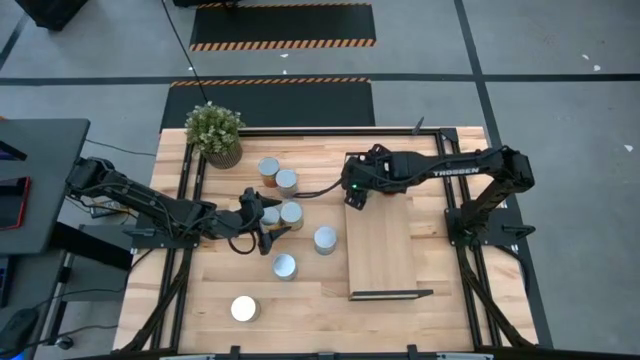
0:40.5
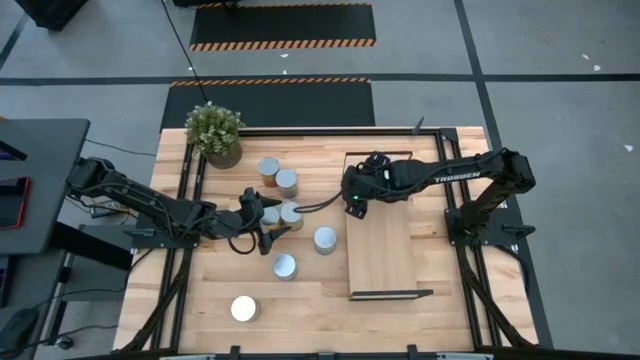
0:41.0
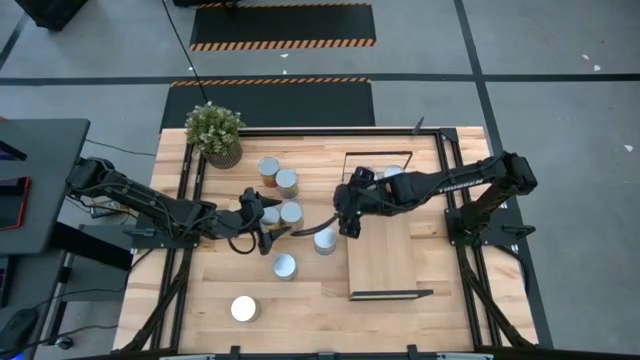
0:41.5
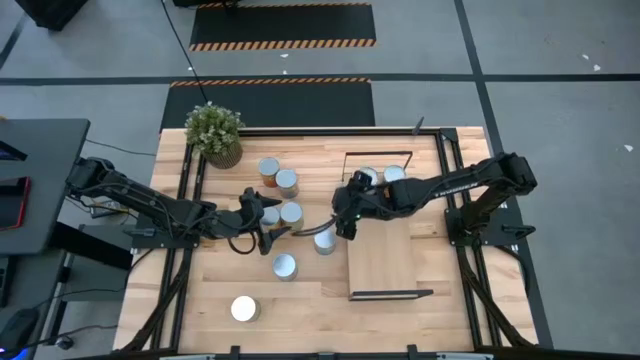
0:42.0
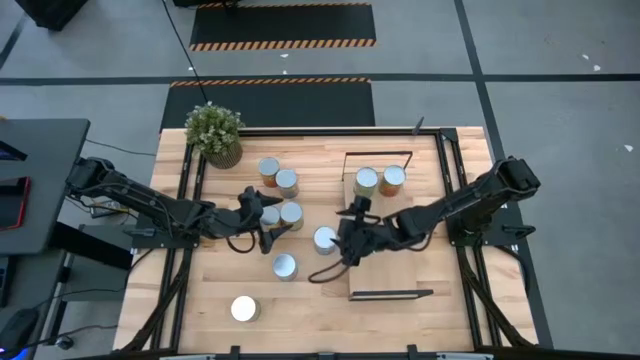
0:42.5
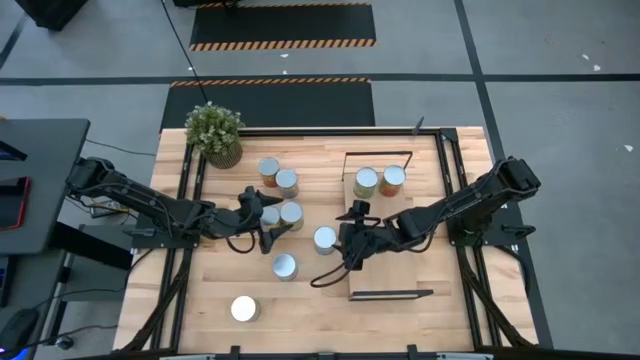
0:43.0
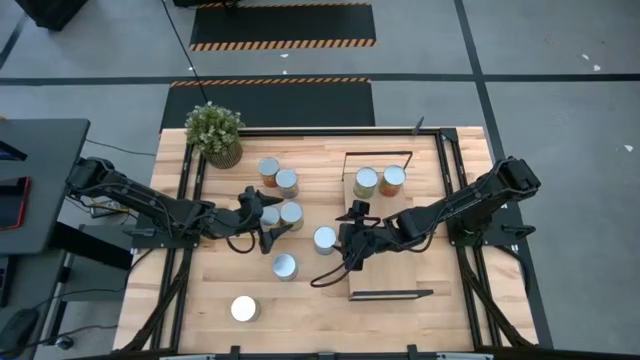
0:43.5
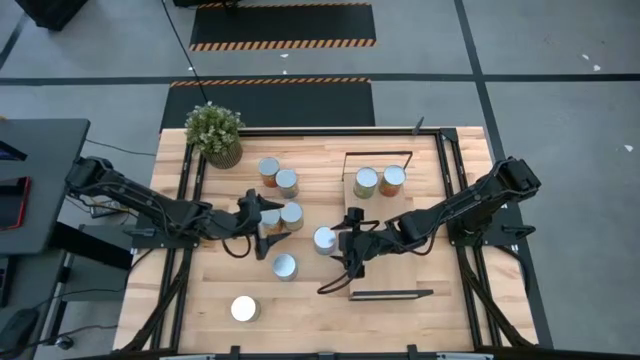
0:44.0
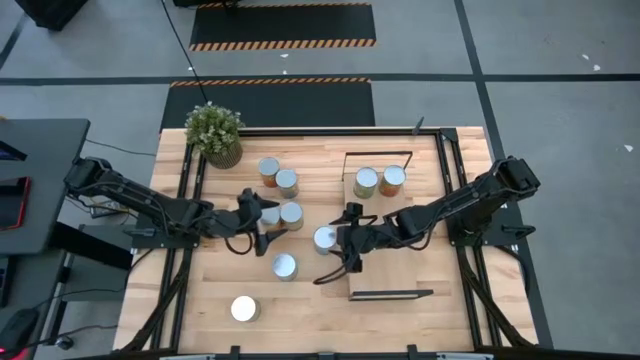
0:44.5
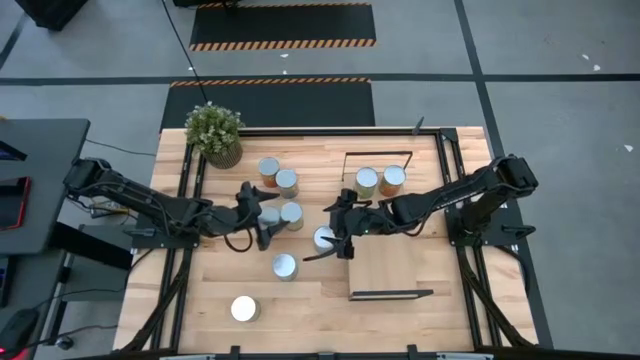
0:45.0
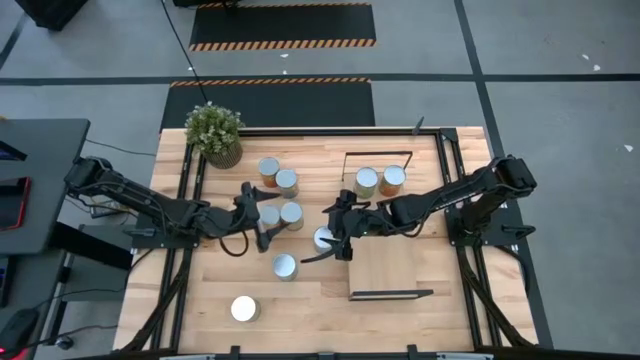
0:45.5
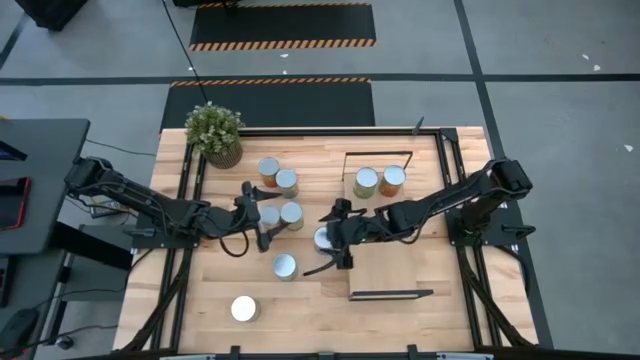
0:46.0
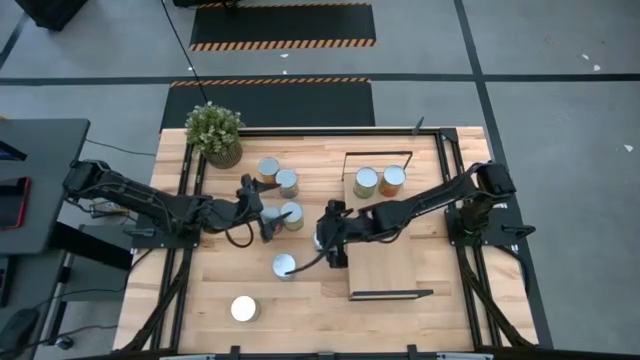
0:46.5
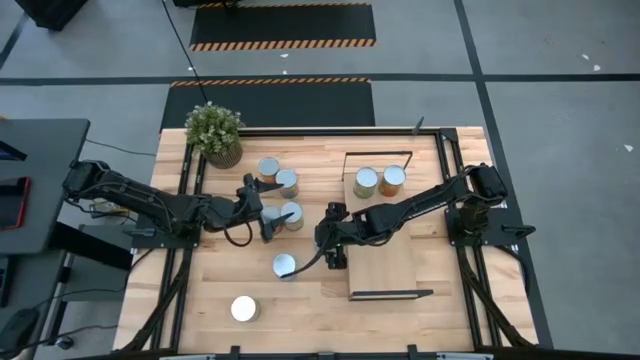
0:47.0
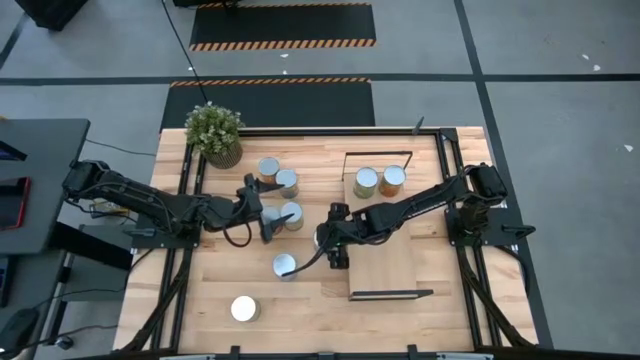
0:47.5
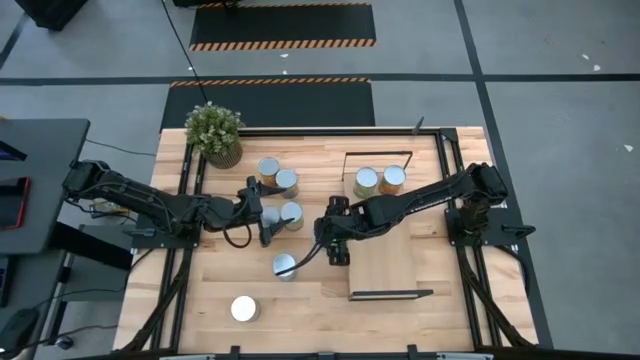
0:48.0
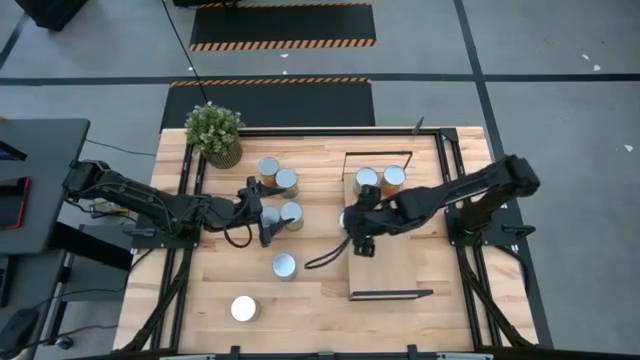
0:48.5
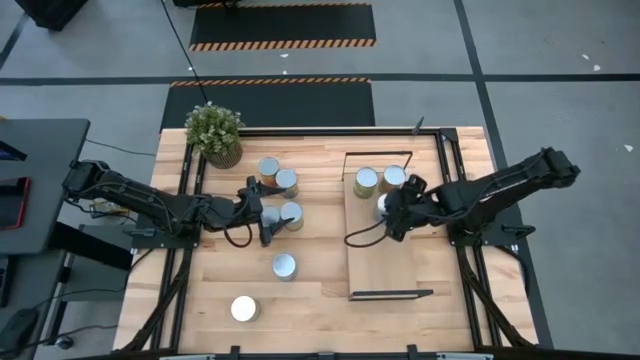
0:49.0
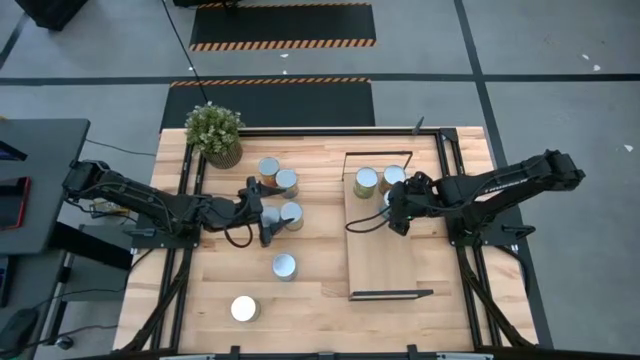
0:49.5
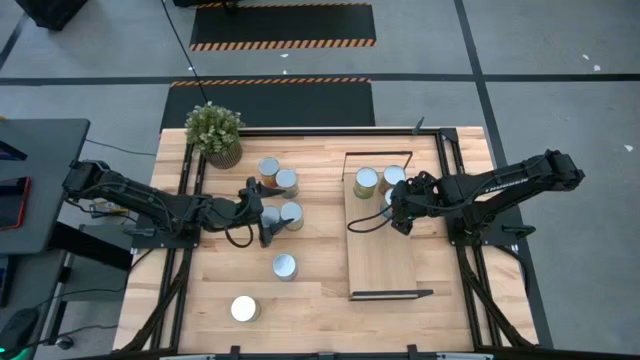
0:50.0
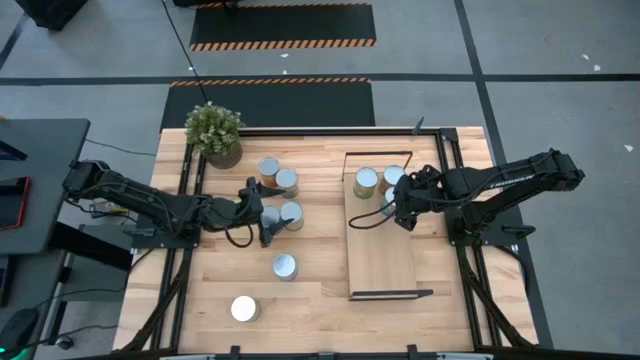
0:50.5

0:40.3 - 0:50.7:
Task: Pick and place cans onto a shelf
Put the canned tomatoes on the shelf

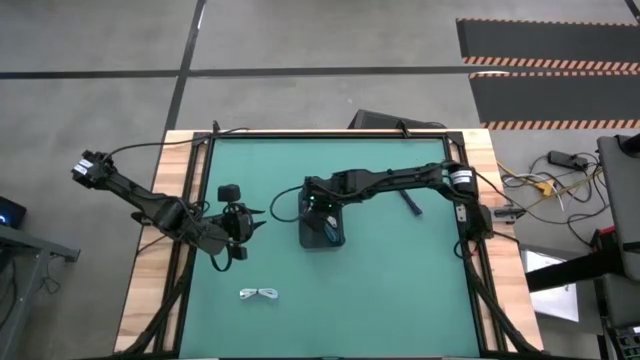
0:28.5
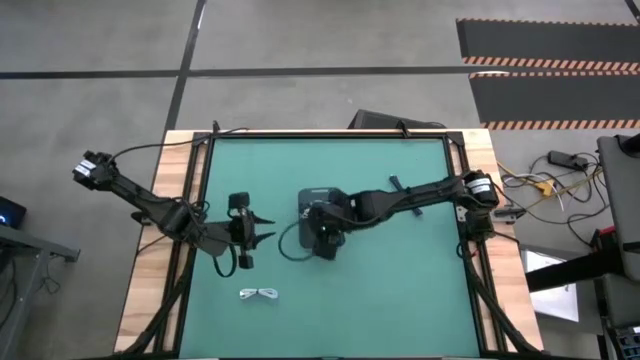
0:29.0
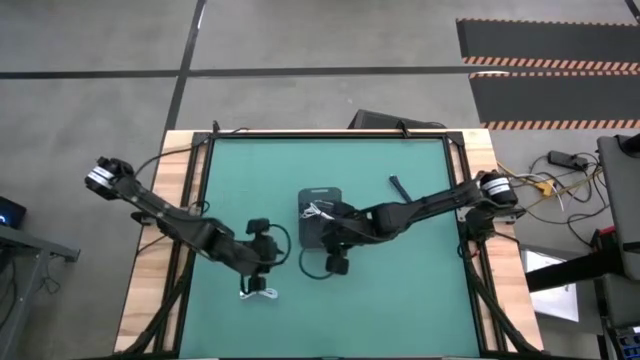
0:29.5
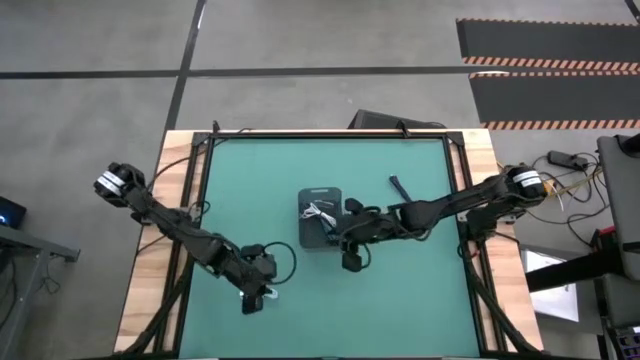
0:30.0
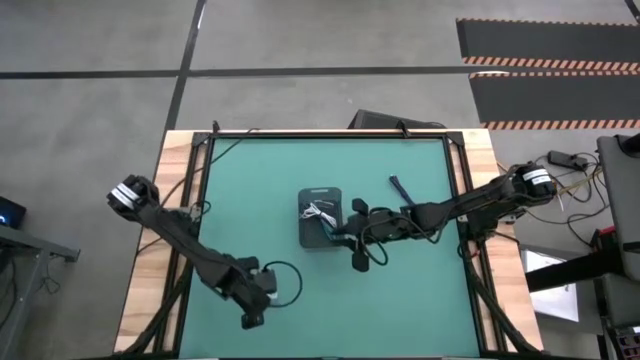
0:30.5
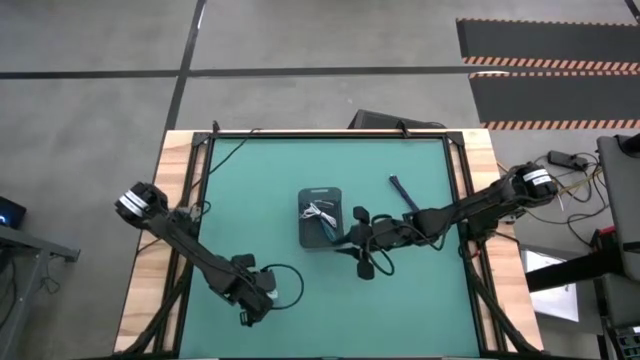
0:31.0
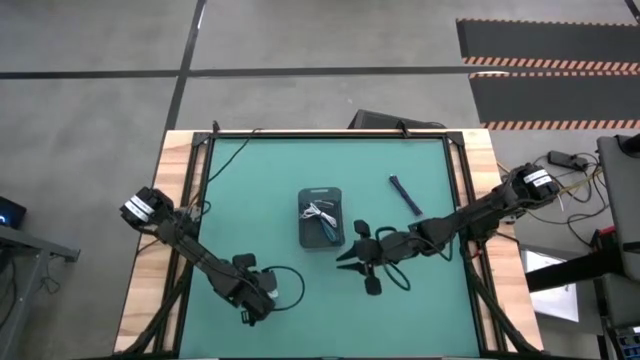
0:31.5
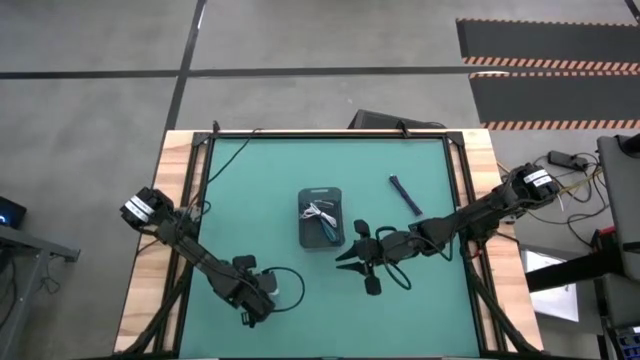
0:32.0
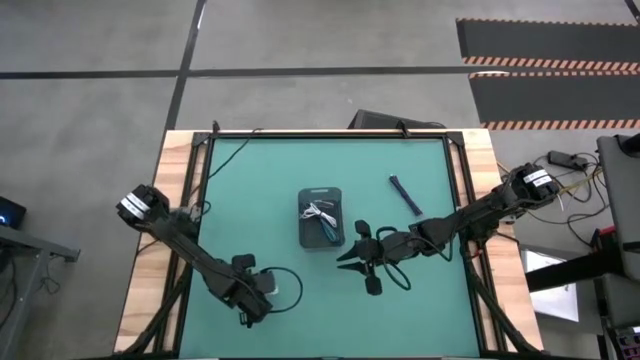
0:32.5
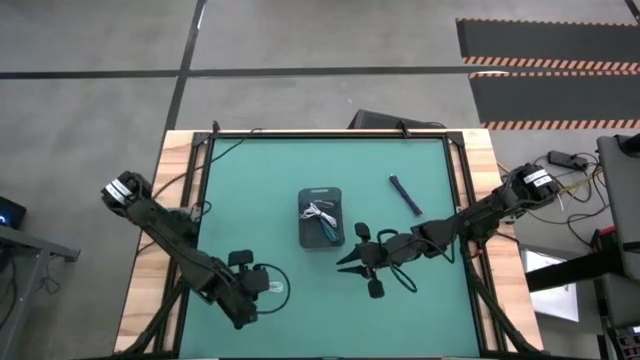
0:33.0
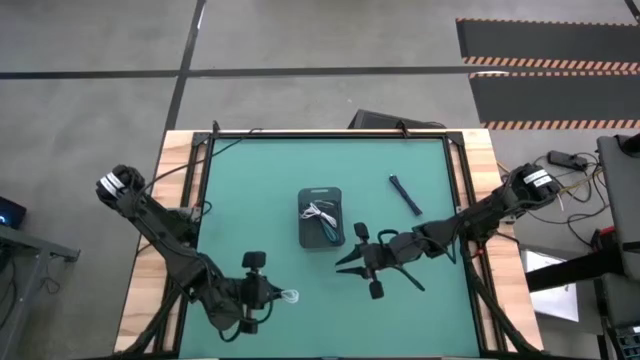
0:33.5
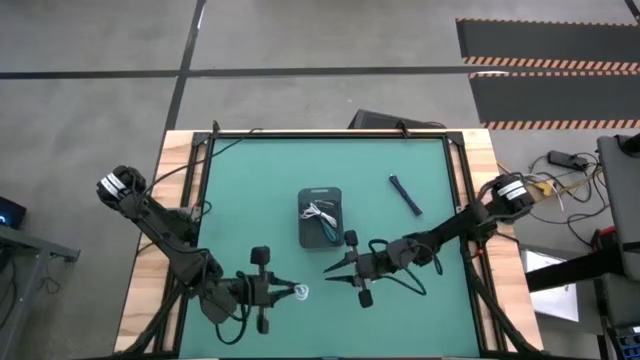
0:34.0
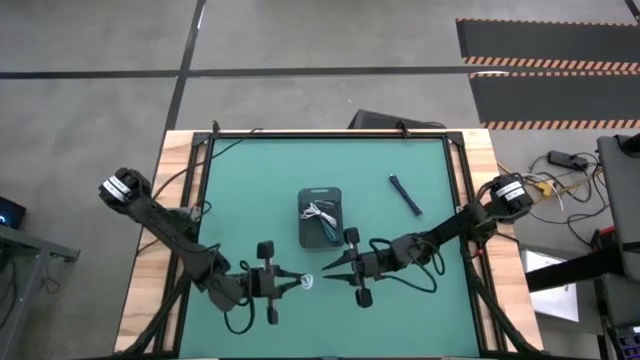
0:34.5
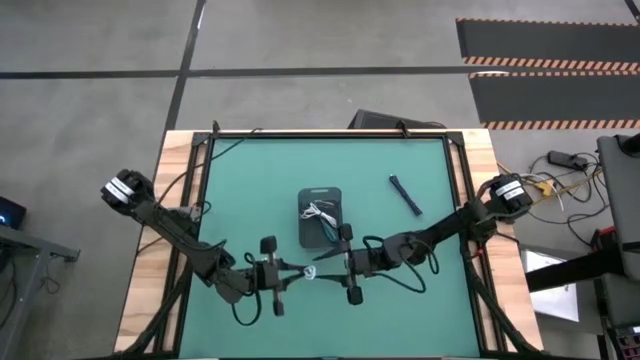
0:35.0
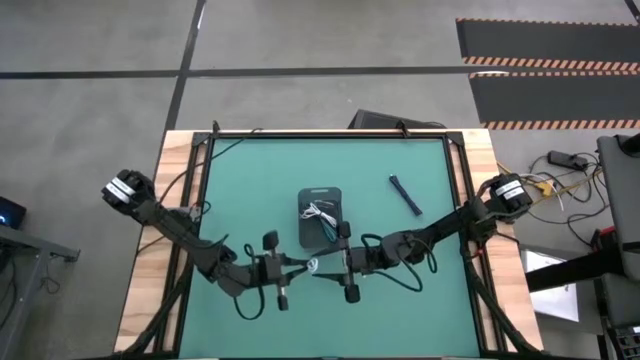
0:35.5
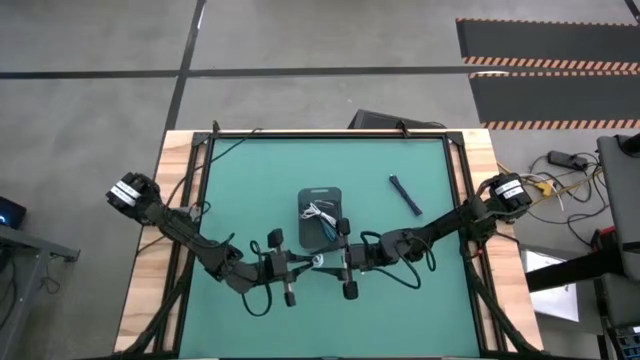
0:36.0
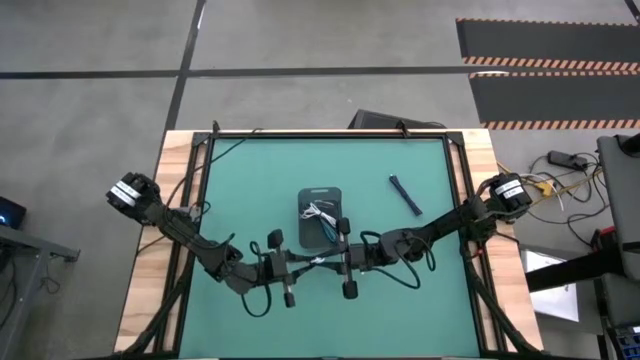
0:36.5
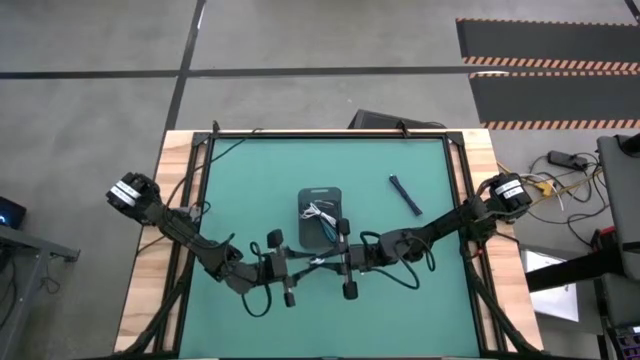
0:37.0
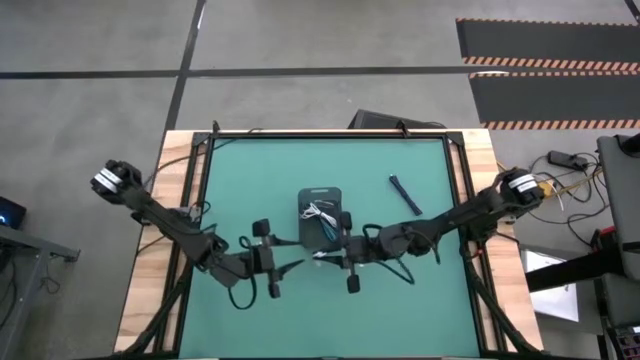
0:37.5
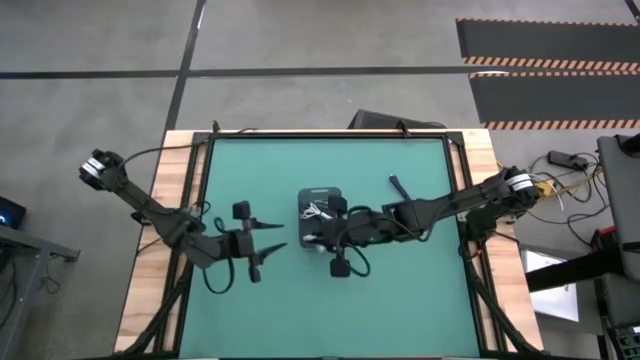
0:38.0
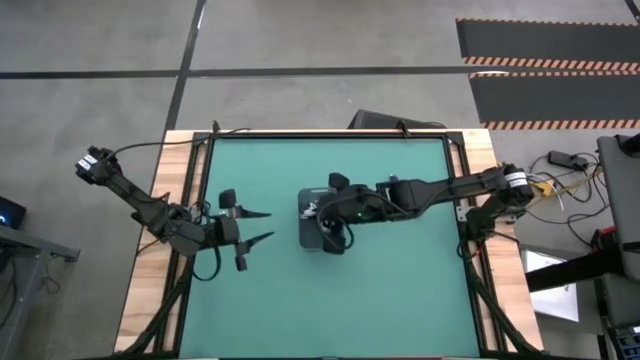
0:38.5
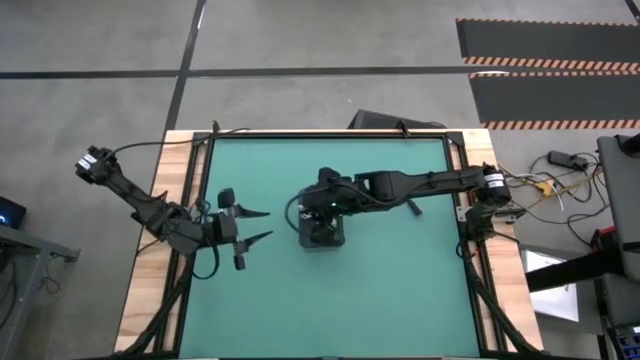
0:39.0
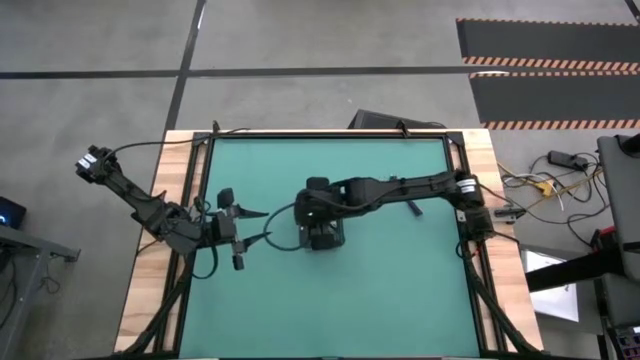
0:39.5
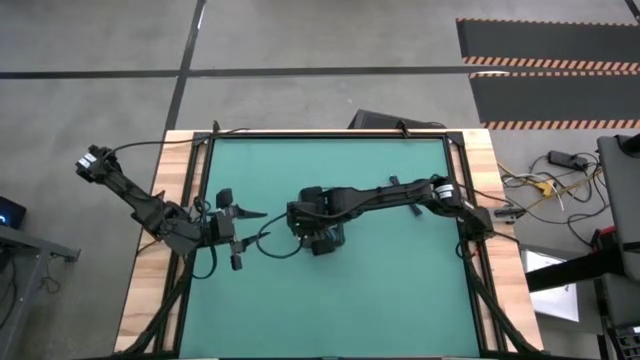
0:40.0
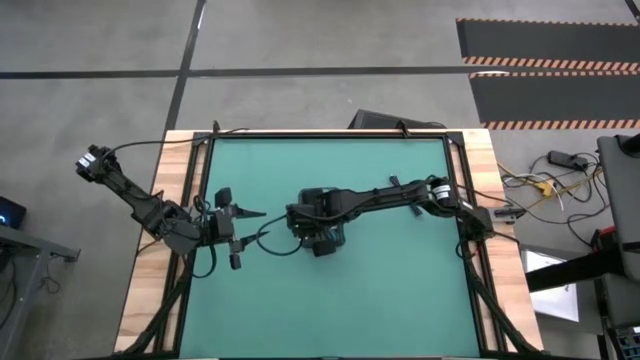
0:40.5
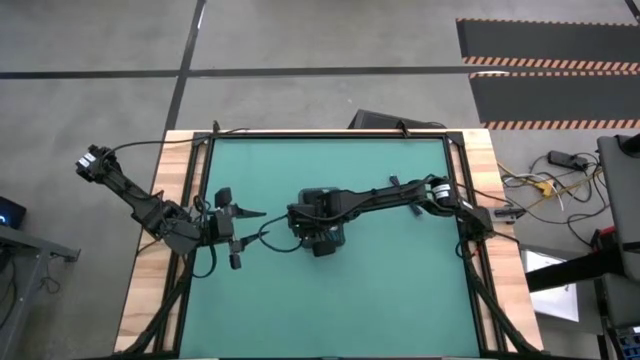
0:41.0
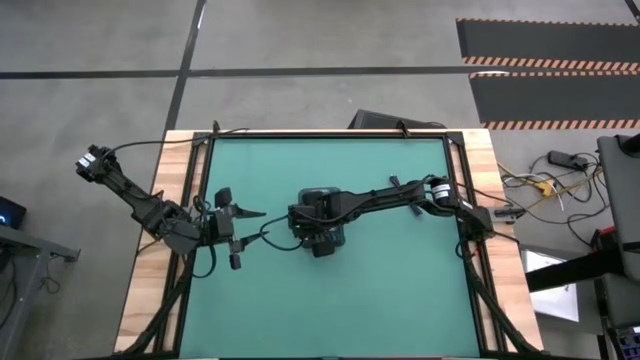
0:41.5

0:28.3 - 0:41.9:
Task: Pick and place USB-C Cables
Put the white charger cable into the black bin
